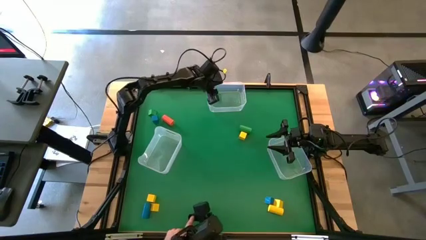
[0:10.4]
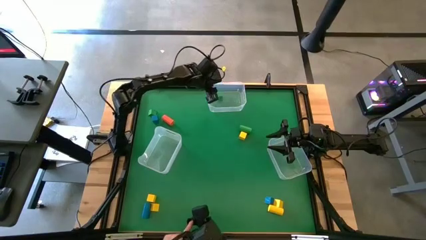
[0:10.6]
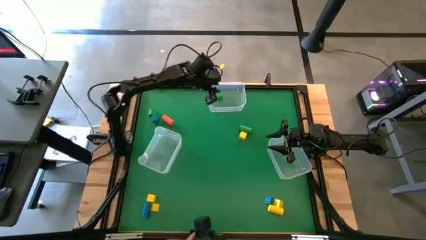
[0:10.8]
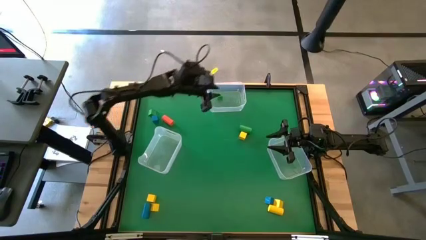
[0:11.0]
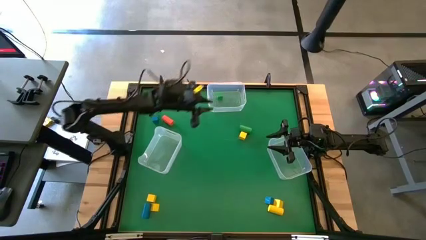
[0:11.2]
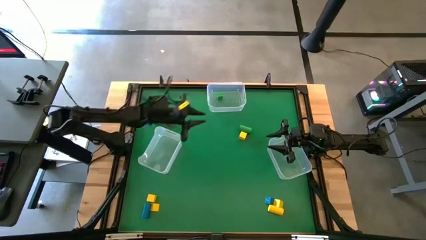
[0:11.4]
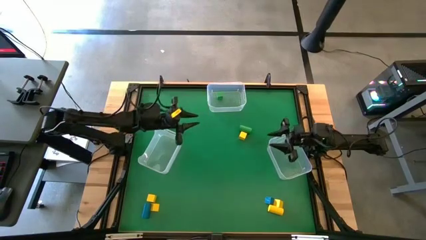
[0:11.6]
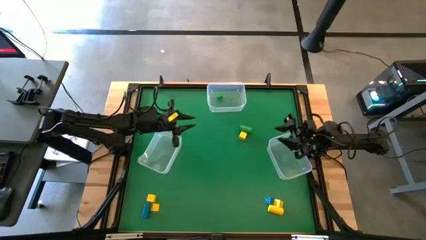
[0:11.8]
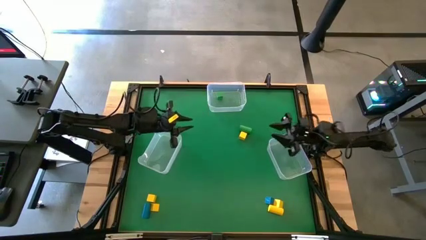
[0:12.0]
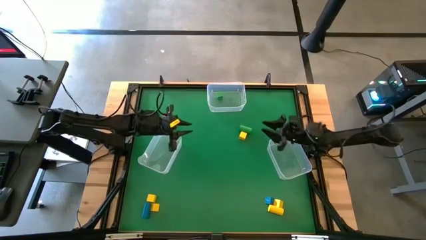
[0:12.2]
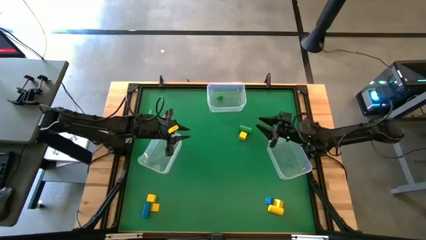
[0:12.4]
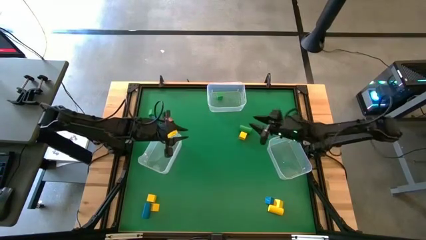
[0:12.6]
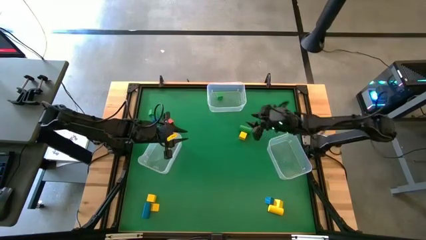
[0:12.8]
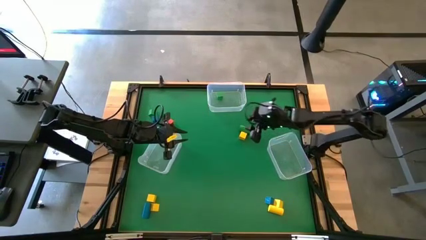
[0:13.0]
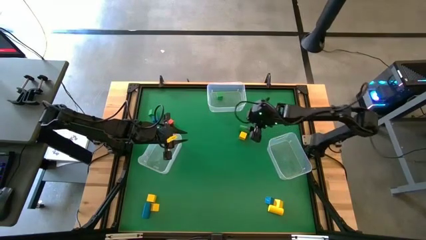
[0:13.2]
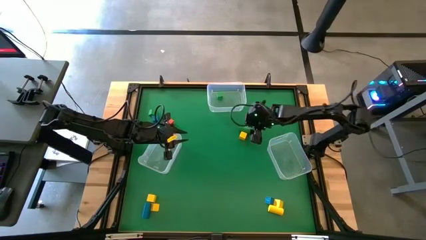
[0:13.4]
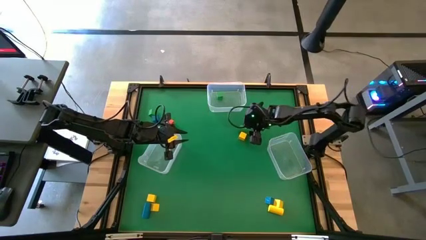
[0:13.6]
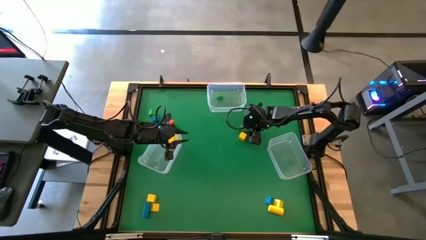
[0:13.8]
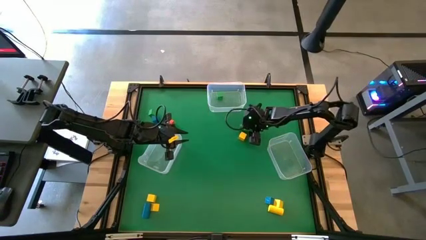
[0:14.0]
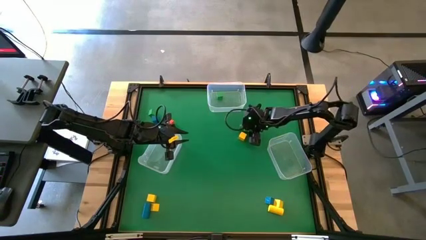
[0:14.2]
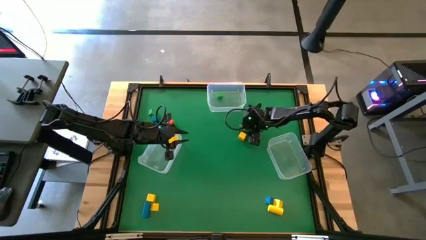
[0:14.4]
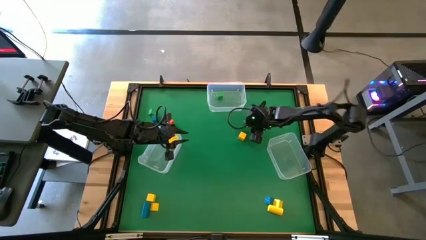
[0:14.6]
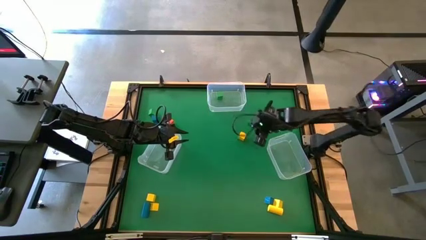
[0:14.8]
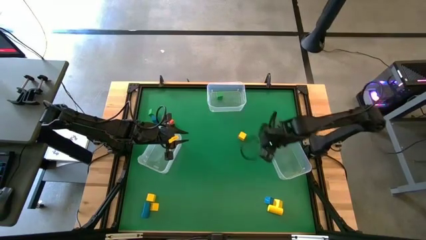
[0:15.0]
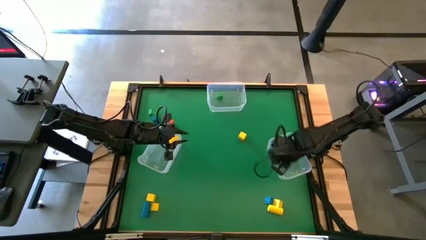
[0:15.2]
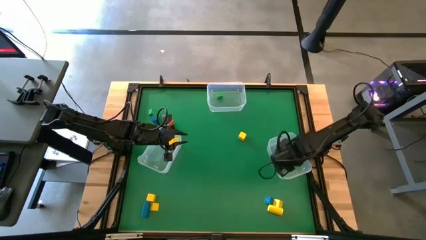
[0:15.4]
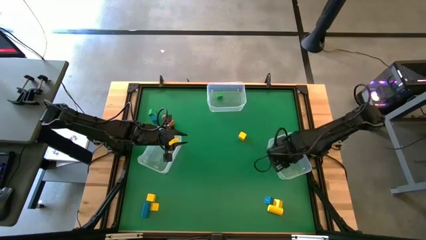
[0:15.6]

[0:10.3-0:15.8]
Task: Sort blocks by size
Put the green cylindrical block into the bottom right transparent bin

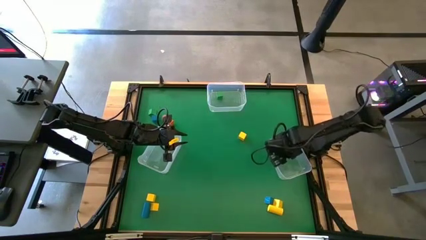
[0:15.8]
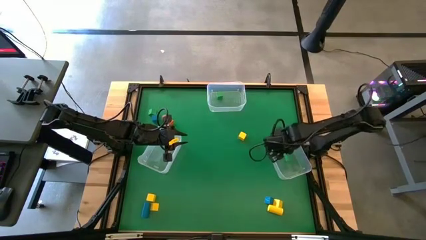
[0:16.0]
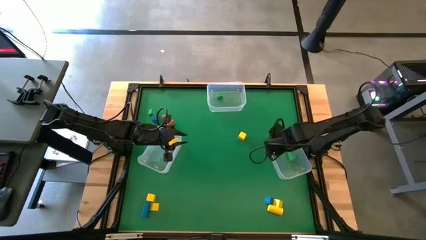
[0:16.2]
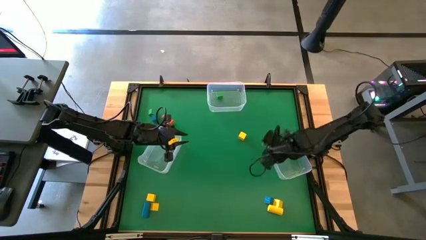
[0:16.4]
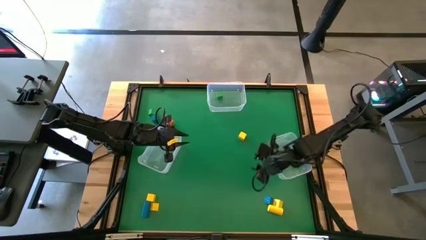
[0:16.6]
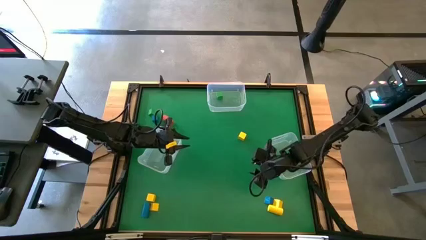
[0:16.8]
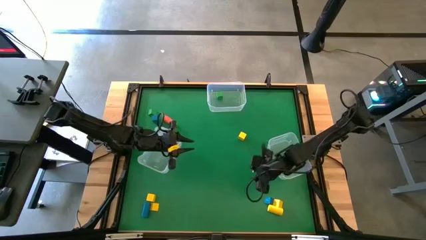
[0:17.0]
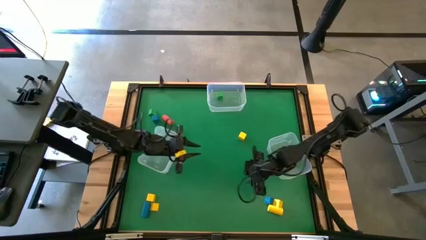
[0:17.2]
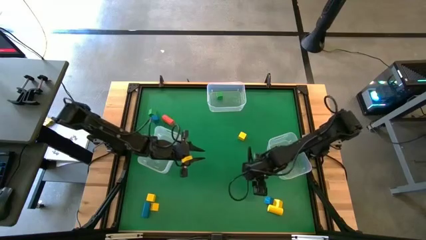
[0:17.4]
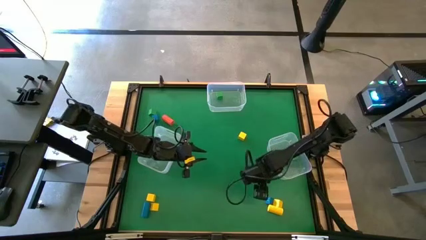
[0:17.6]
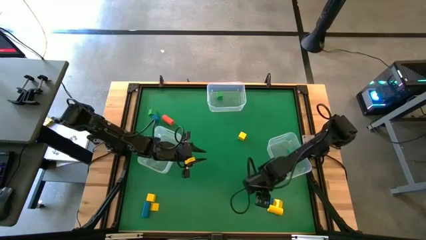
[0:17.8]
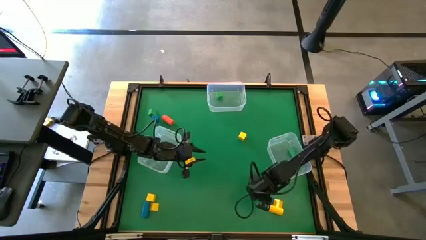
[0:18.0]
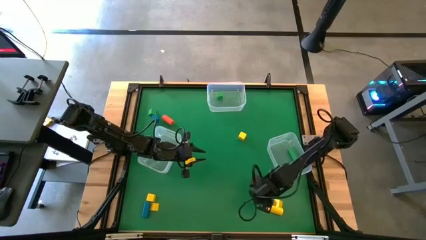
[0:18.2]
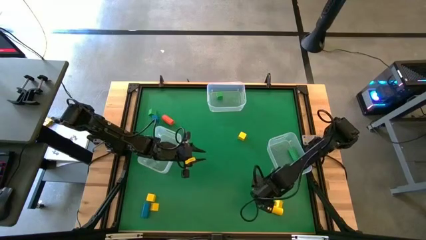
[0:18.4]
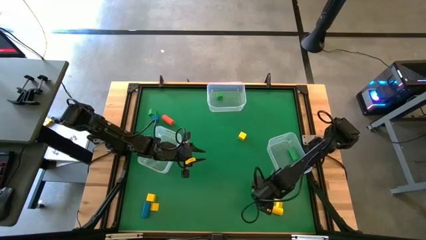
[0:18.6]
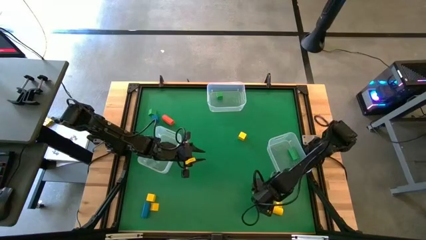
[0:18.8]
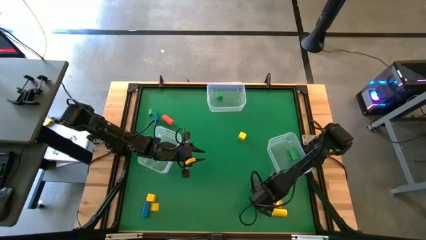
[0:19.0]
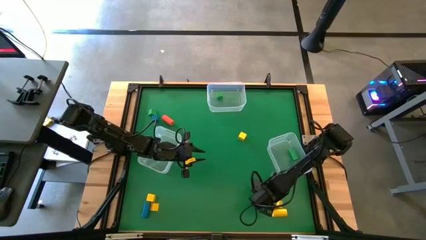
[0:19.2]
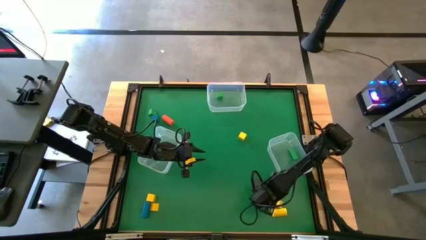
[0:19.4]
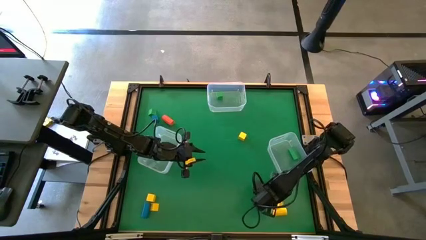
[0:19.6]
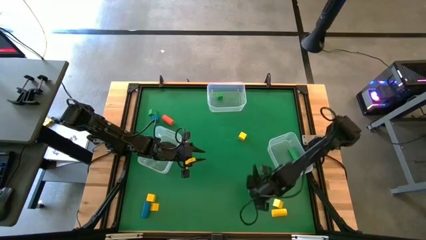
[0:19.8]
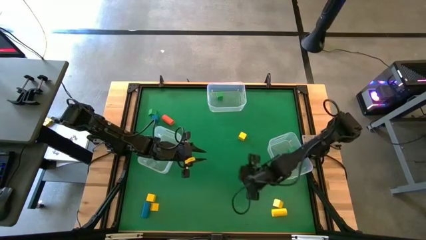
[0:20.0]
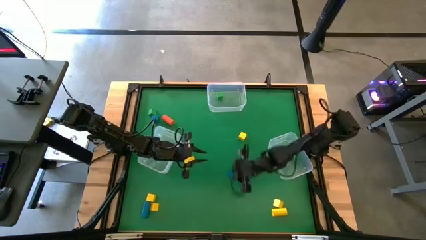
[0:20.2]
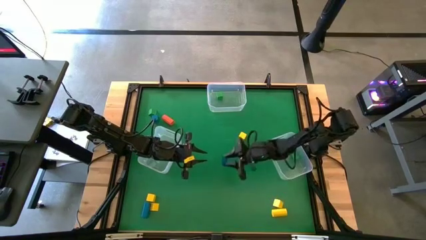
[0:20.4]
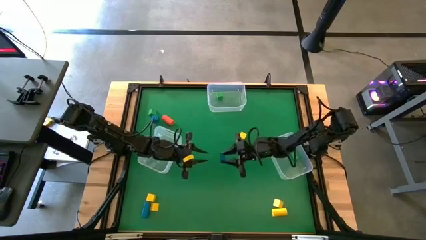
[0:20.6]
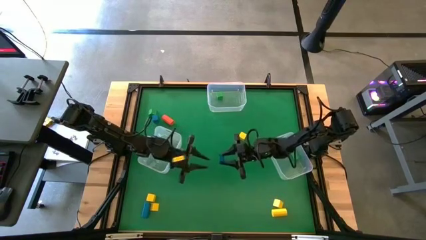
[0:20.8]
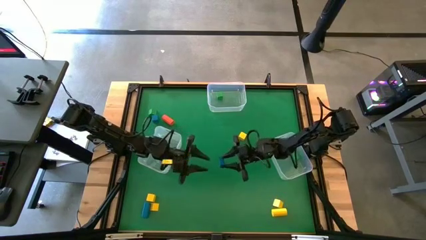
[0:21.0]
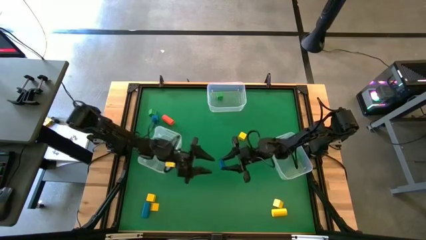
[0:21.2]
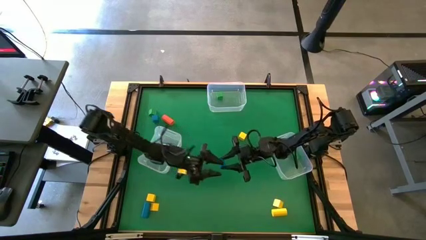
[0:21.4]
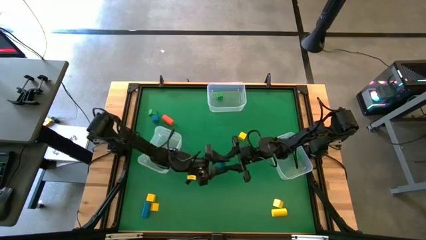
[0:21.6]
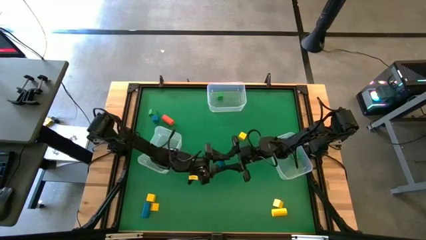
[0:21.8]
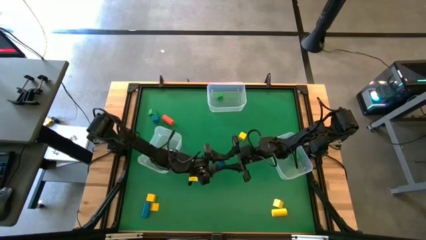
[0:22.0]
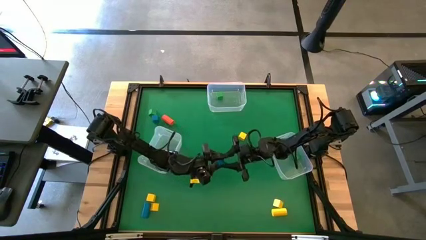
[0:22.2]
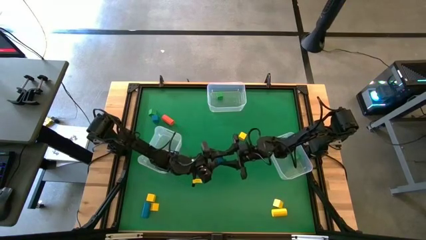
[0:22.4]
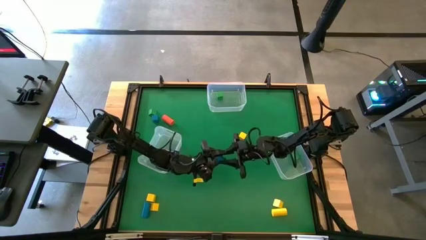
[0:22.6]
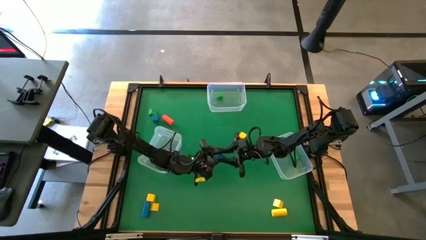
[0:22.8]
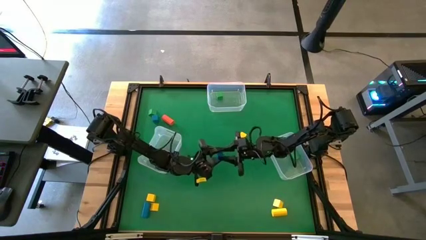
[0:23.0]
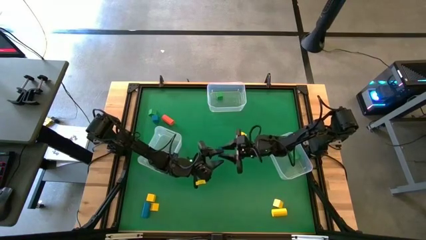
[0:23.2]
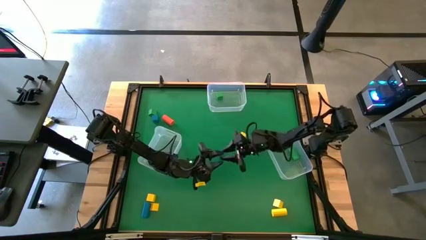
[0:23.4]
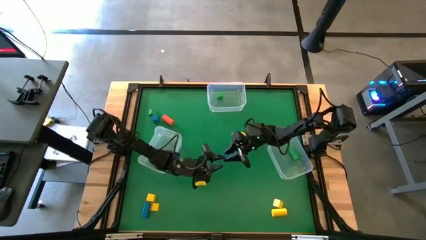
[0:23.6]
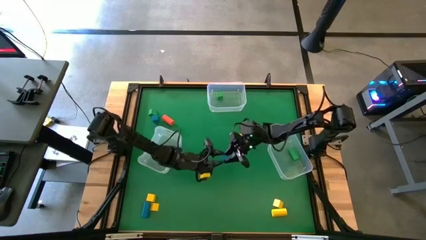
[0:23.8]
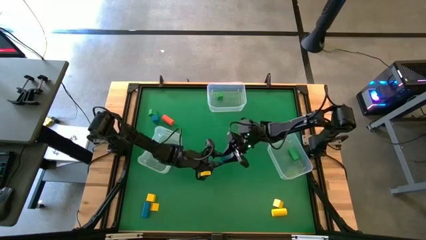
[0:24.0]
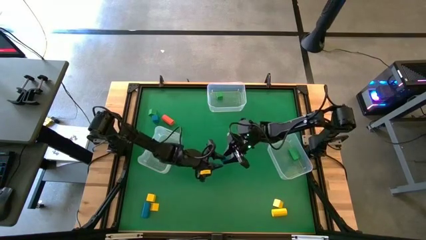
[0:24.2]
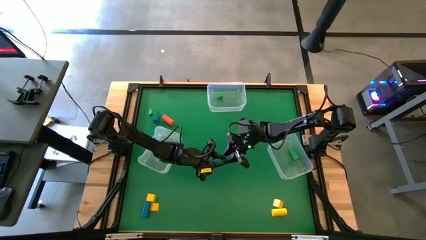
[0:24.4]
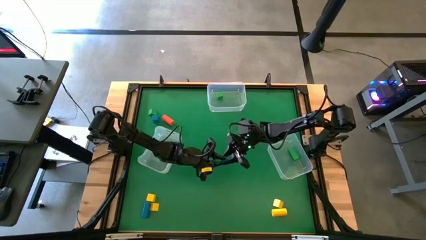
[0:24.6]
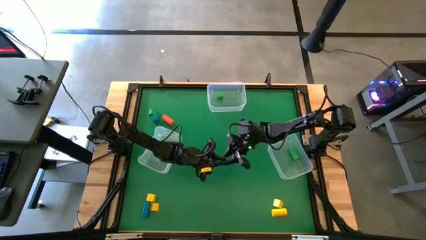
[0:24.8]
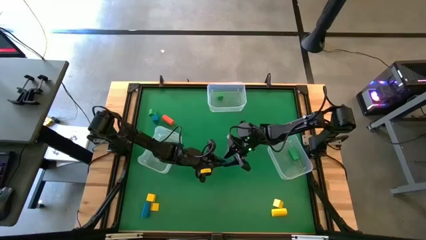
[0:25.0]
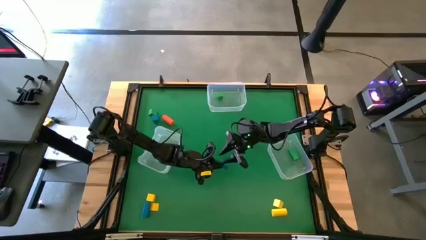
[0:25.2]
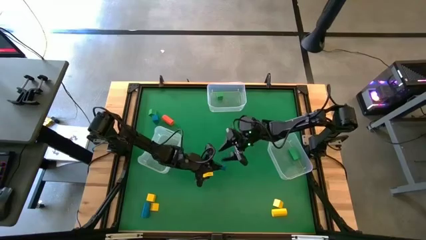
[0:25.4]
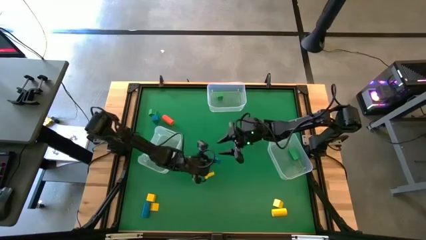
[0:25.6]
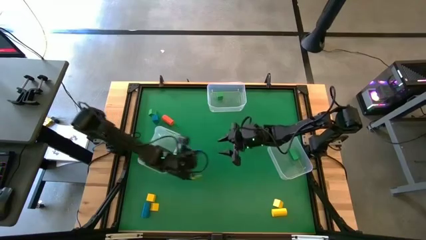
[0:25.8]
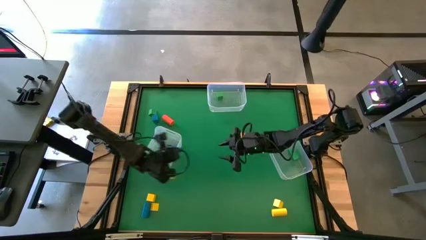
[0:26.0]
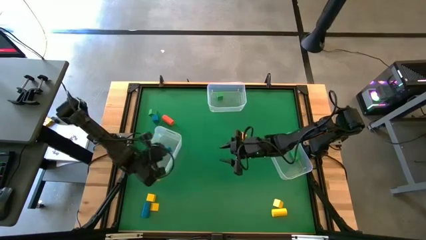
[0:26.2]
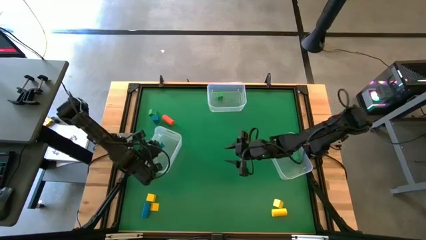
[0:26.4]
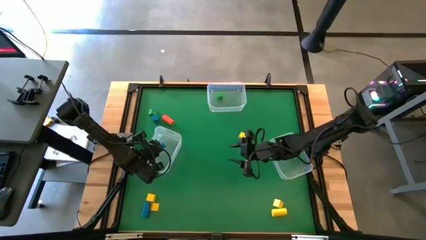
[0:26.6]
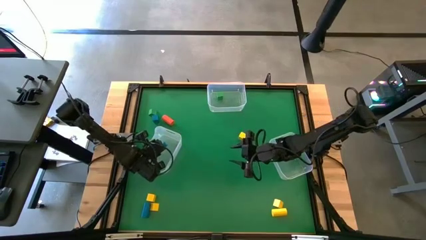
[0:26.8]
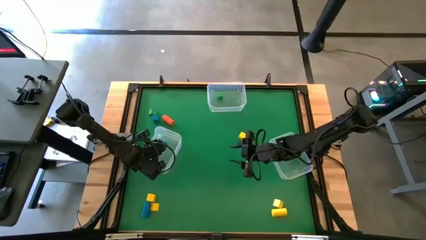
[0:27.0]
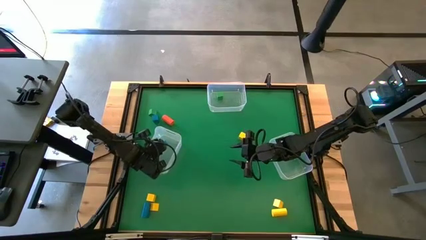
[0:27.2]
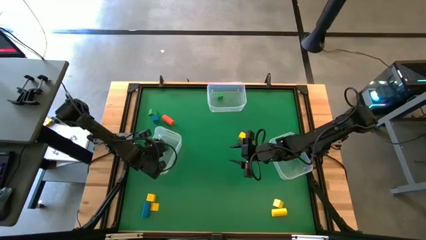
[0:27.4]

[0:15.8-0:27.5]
Put the blue triangular block into the bottom left transparent bin
